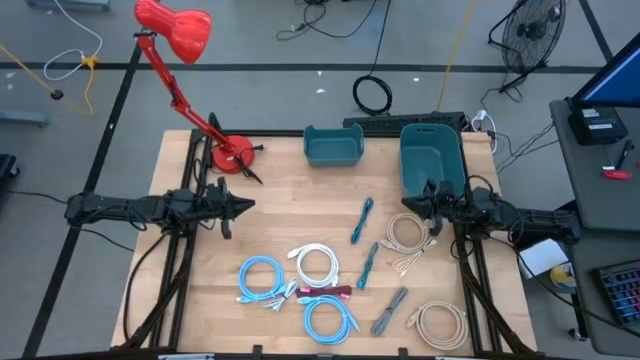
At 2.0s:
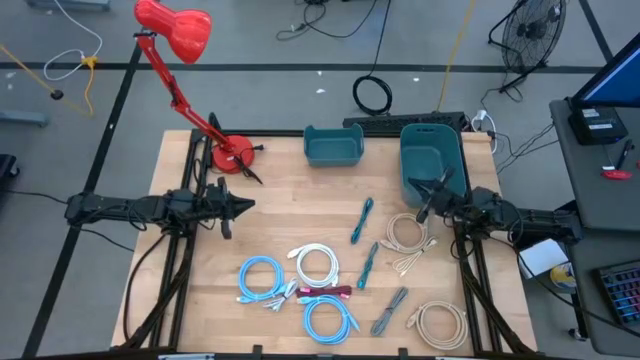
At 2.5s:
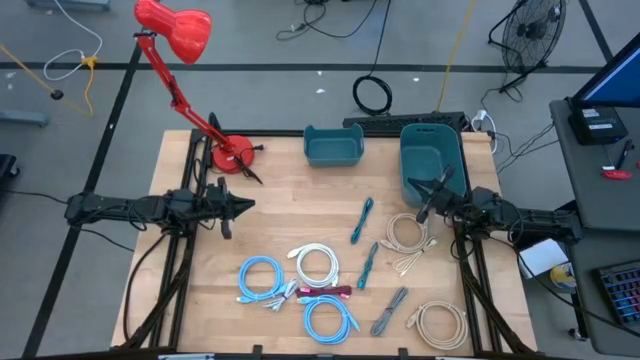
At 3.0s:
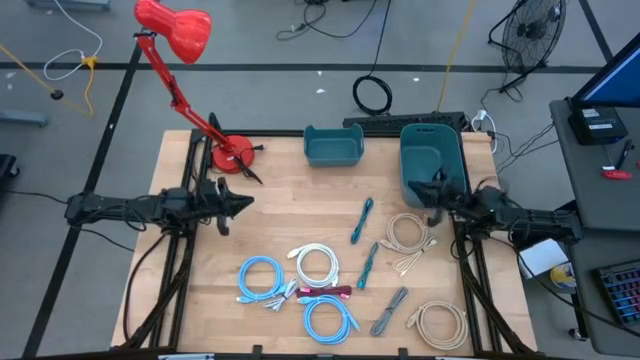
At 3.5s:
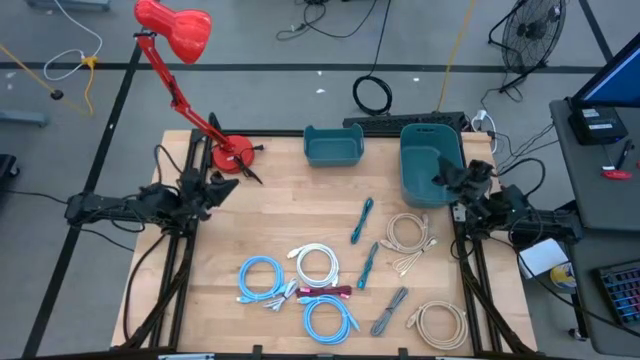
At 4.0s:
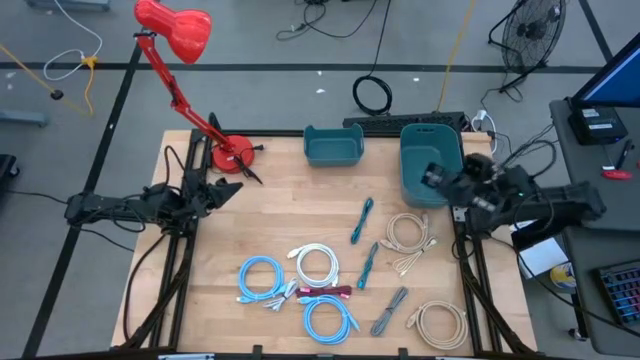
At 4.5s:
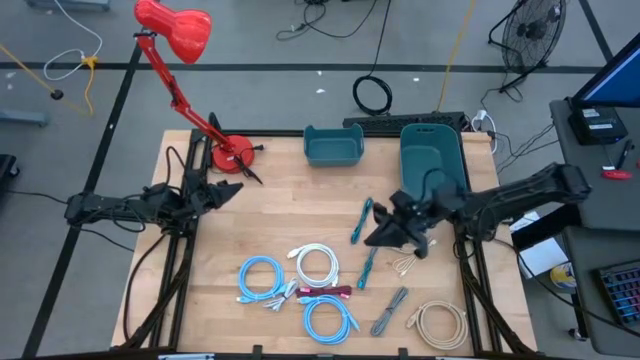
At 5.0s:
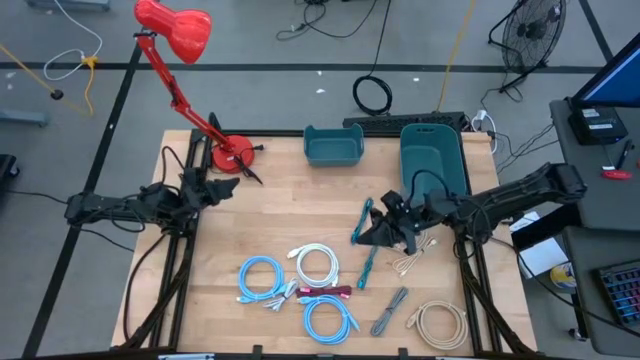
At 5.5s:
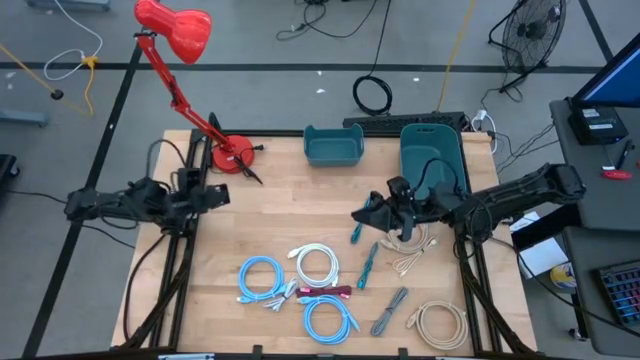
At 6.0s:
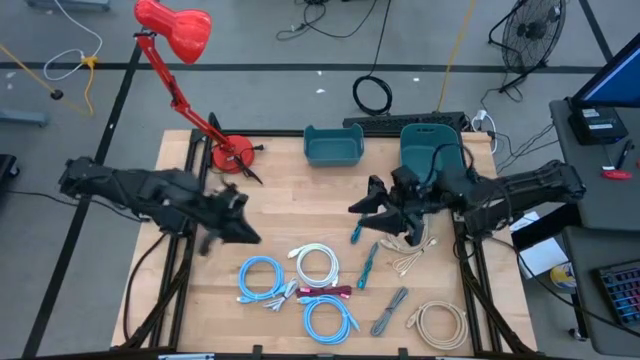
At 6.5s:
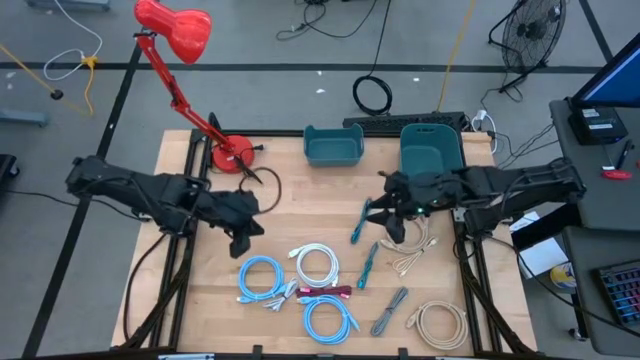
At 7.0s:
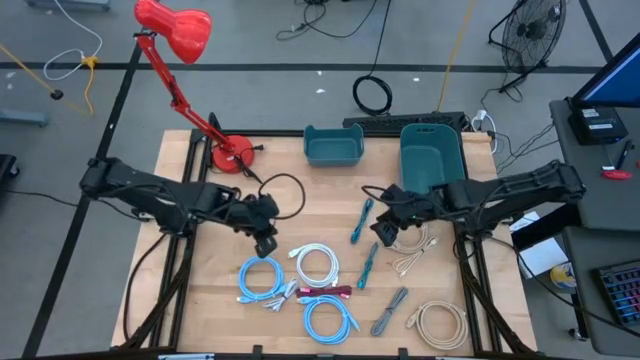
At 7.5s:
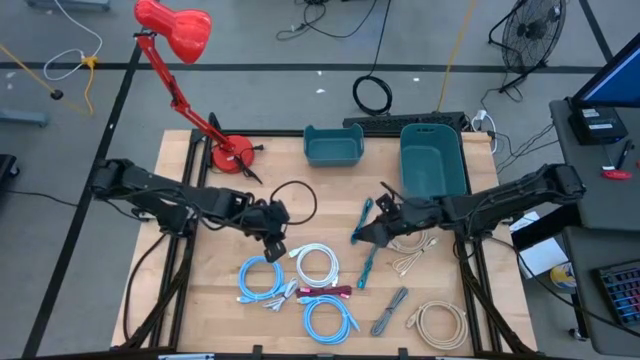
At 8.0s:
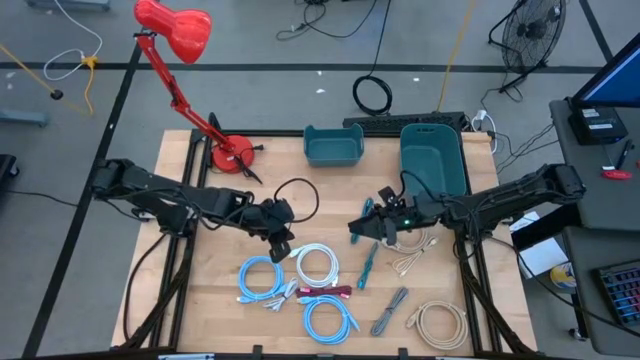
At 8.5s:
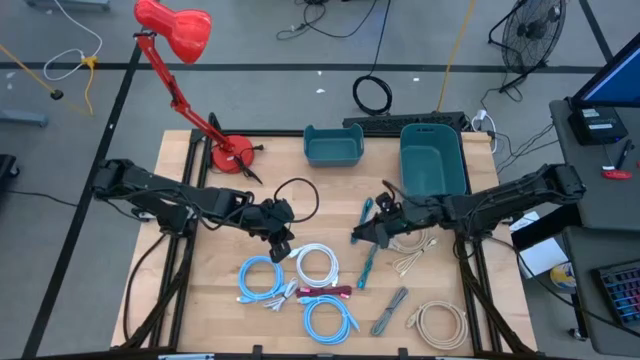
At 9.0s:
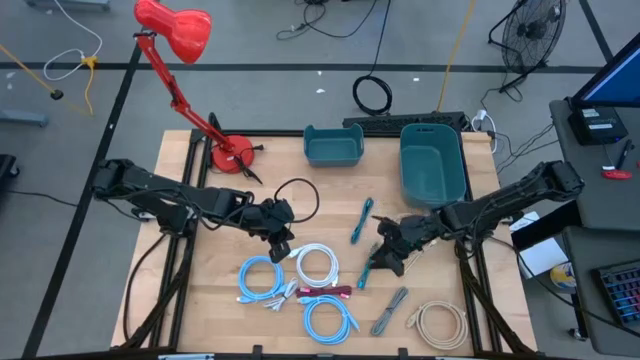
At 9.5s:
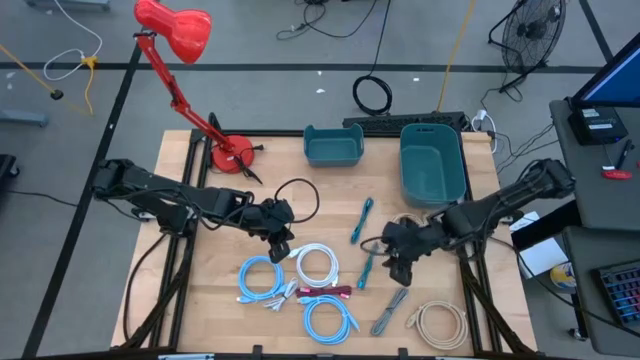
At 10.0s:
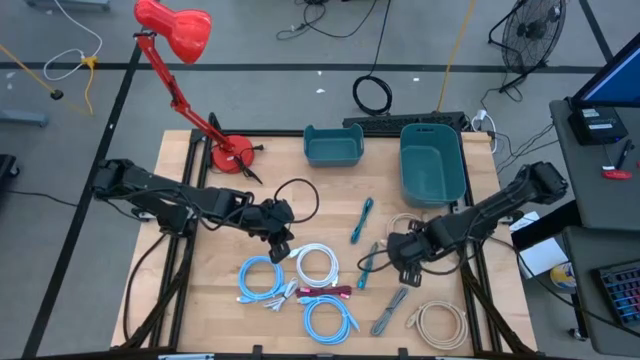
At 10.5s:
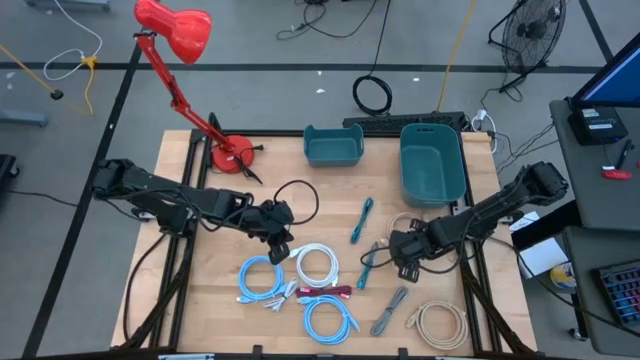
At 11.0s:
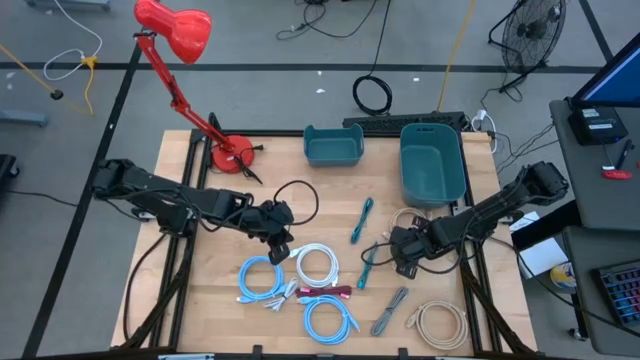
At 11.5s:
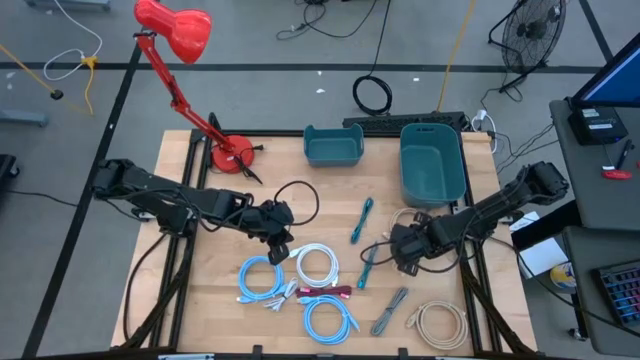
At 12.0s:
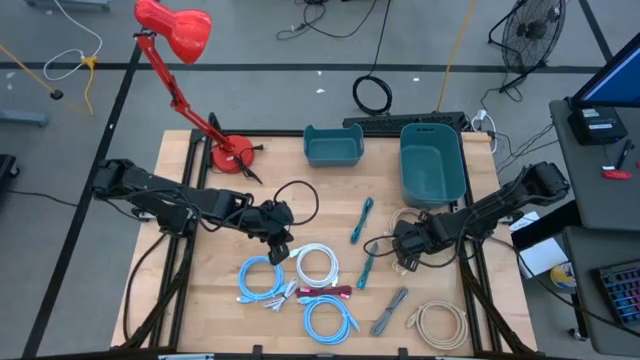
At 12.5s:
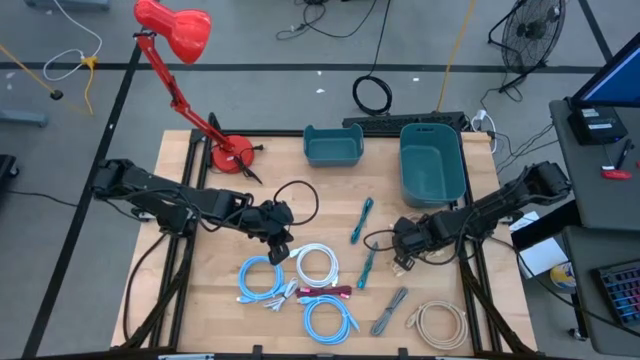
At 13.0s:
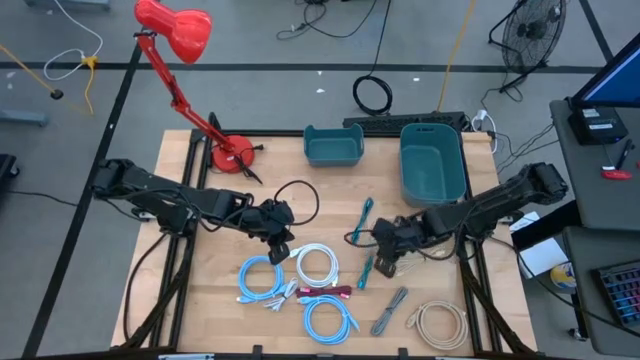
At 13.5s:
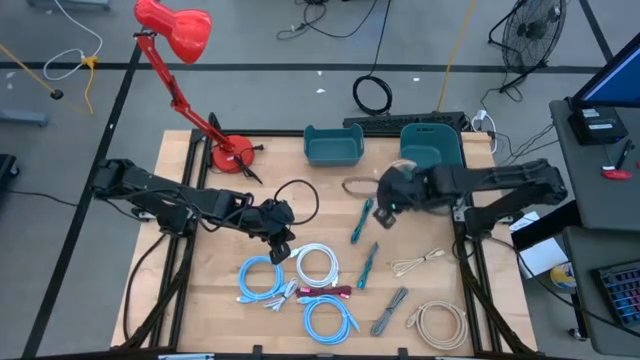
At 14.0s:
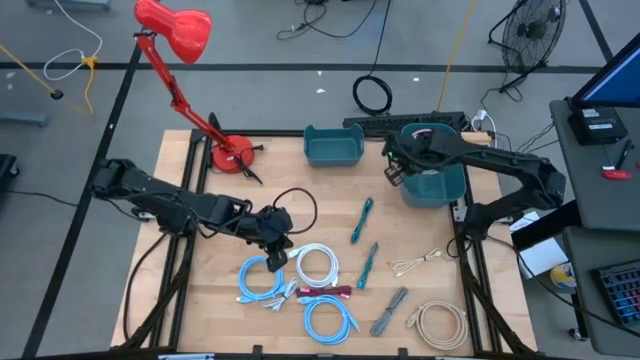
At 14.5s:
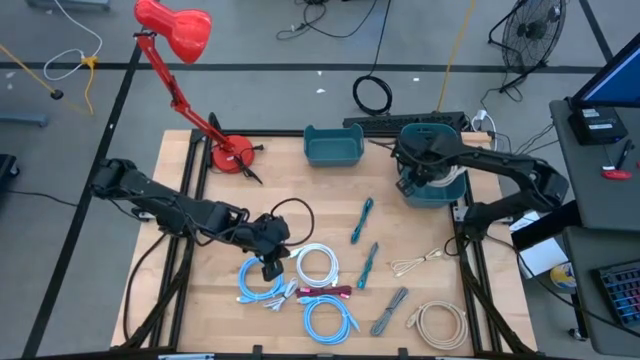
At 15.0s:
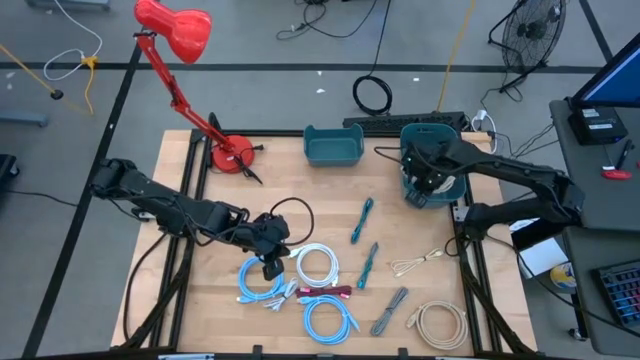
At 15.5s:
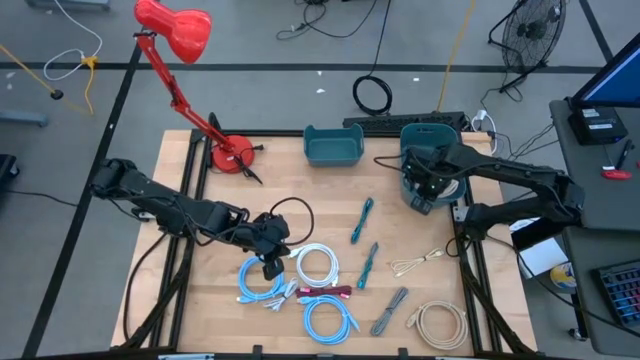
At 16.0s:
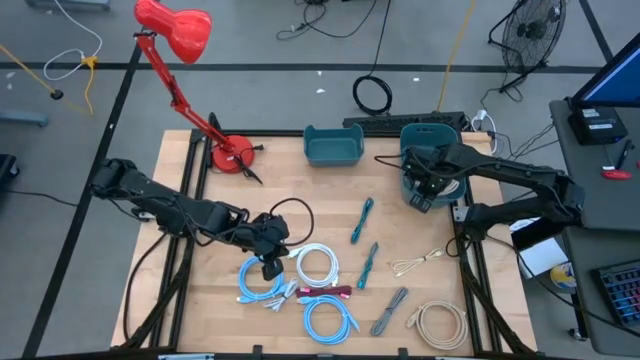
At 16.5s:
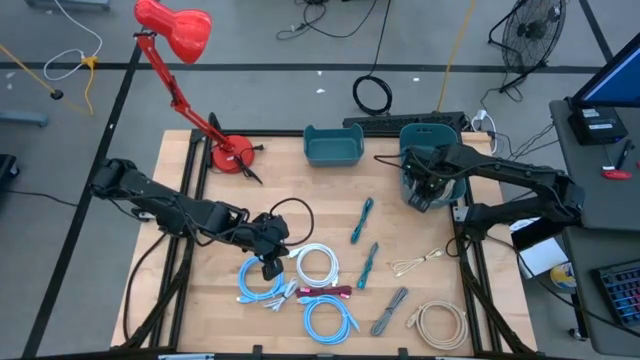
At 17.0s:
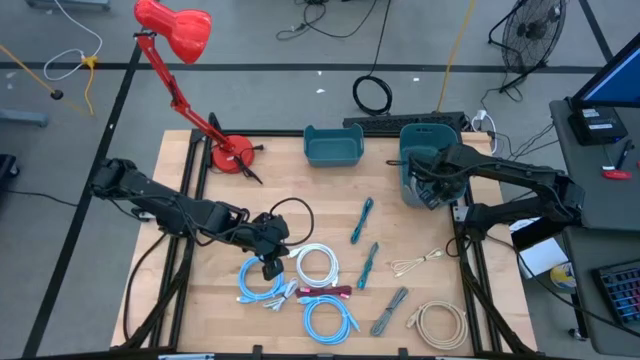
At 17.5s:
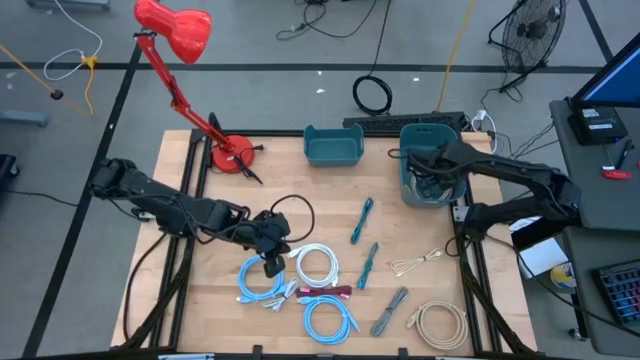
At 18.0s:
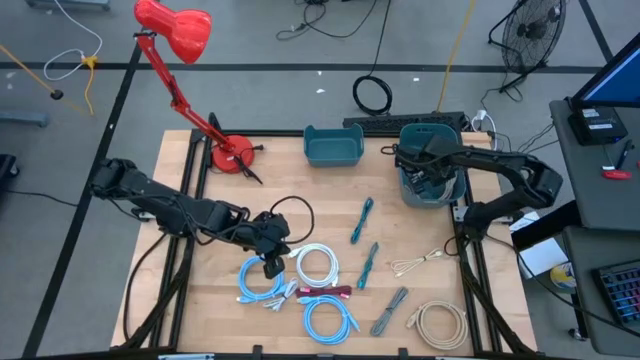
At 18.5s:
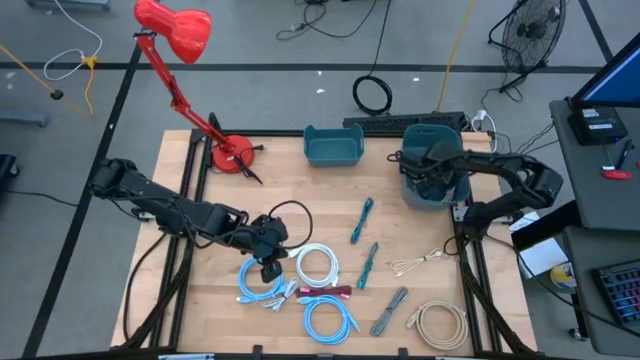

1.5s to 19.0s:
Task: Pick & Place USB Port
Put the right brown HDMI cable into the right blue bin

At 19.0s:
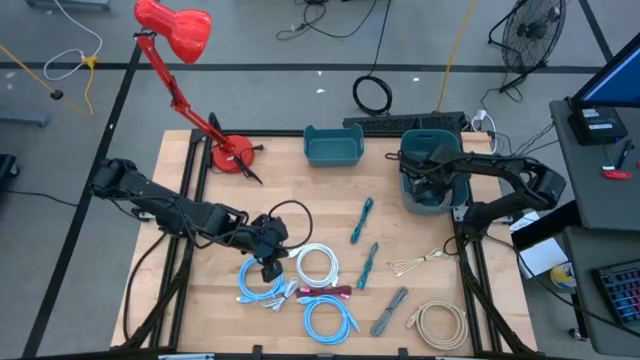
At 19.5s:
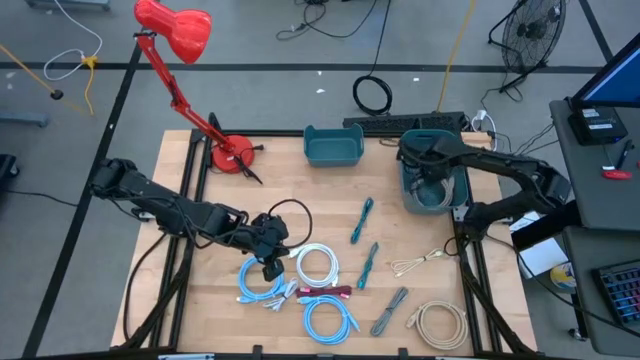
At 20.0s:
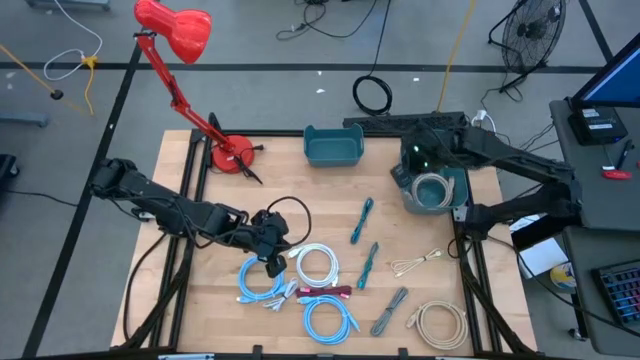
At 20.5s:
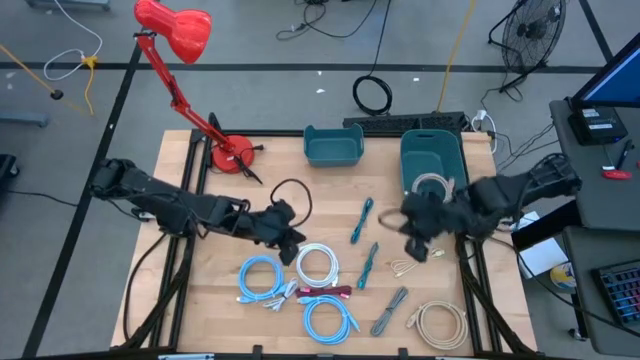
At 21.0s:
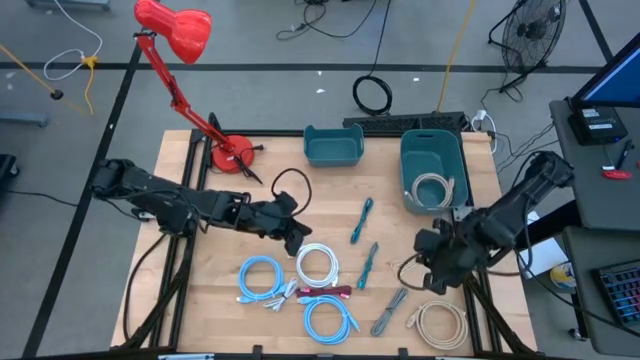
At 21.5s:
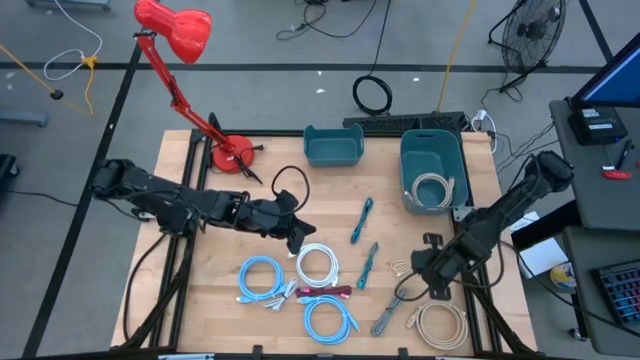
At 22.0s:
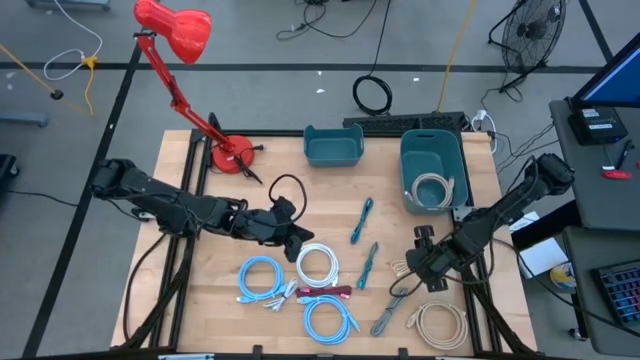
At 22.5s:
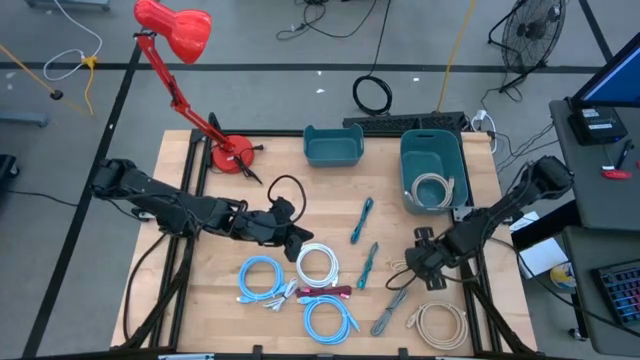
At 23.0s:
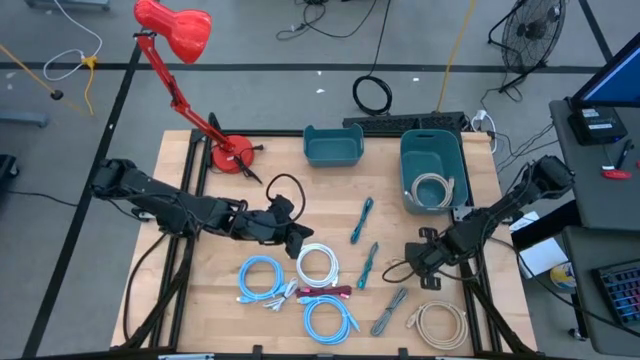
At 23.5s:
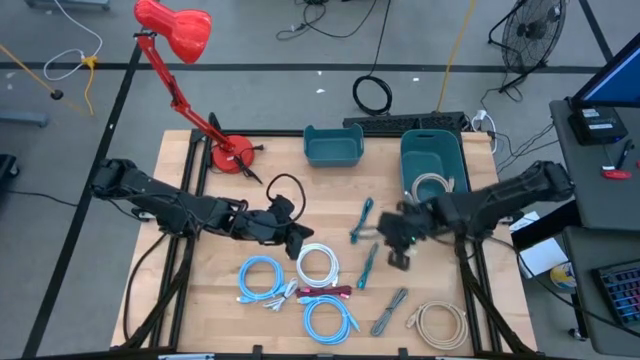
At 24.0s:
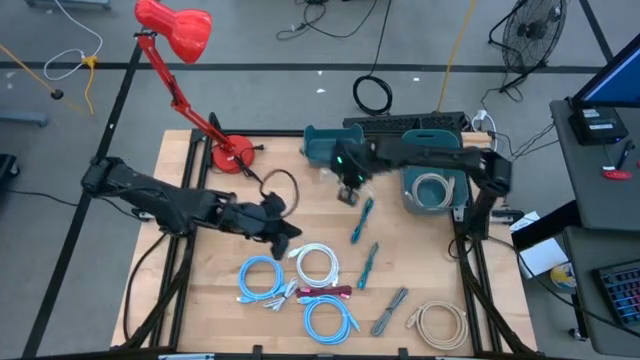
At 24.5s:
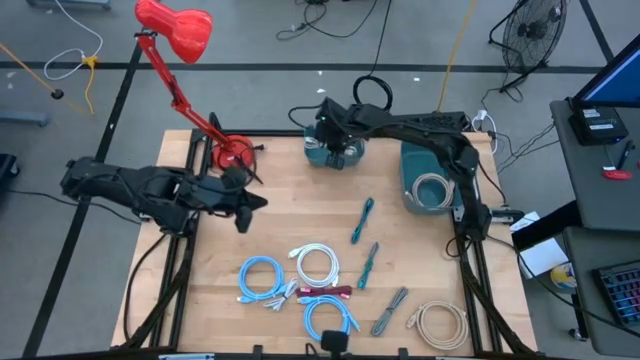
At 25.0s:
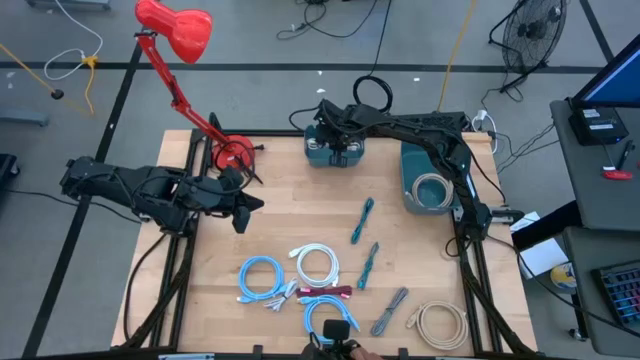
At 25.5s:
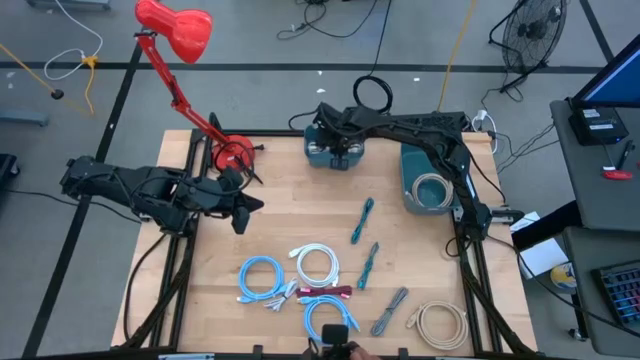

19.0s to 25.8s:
Put the white charger cable into the left blue bin
